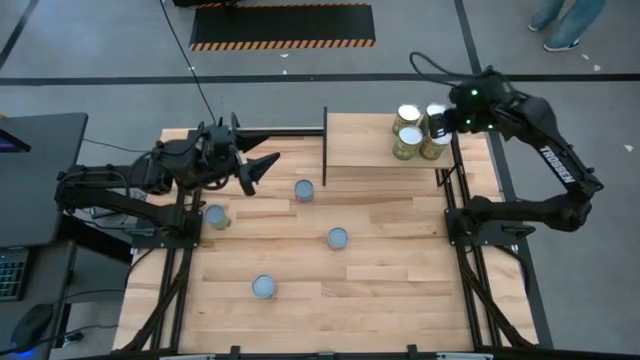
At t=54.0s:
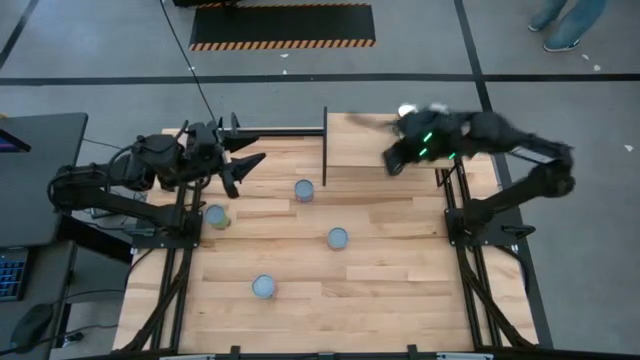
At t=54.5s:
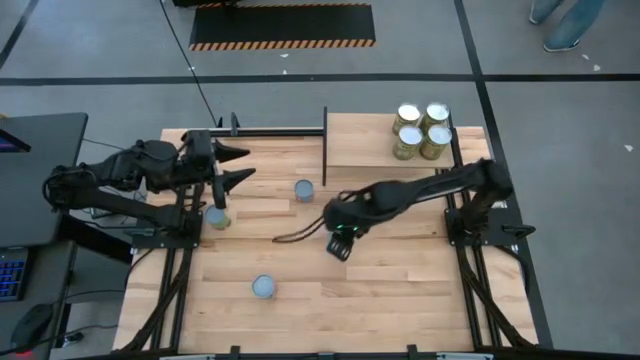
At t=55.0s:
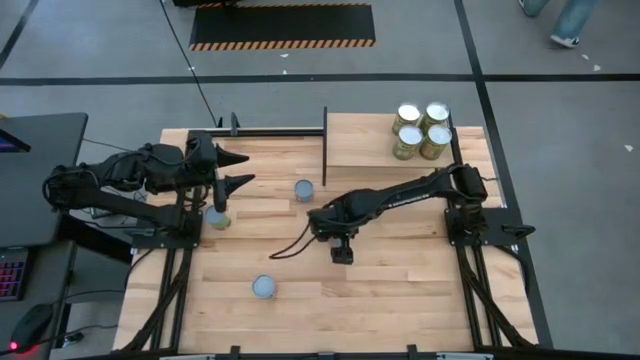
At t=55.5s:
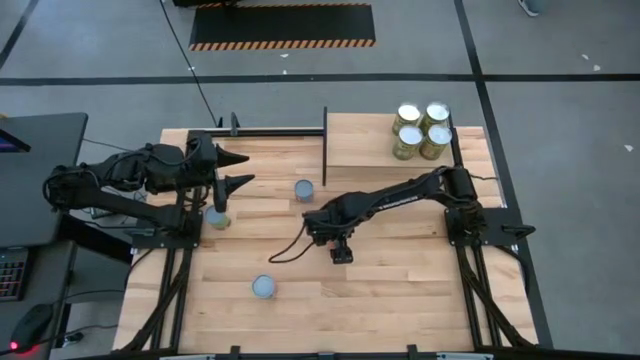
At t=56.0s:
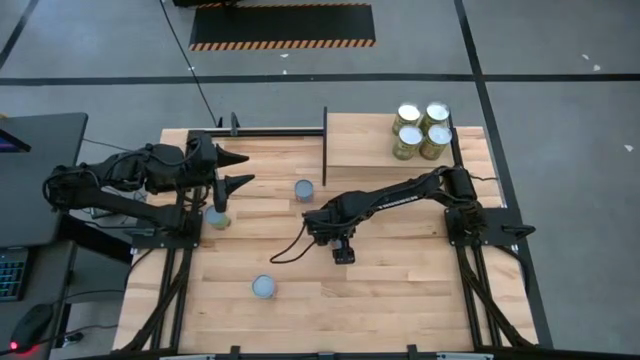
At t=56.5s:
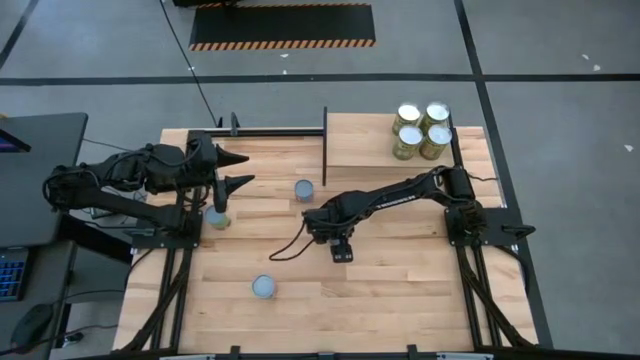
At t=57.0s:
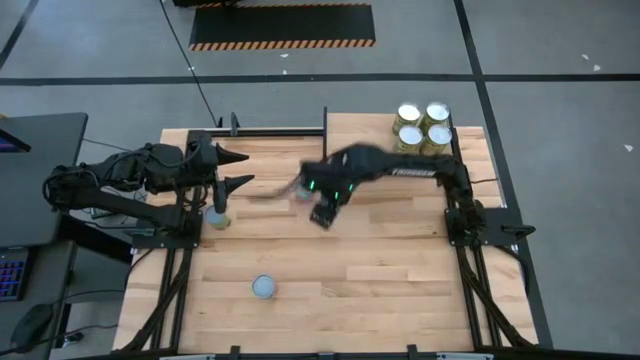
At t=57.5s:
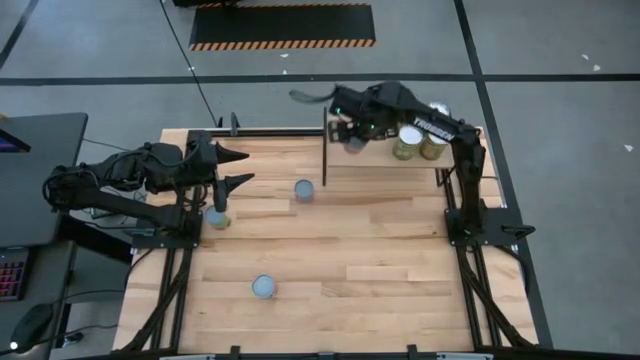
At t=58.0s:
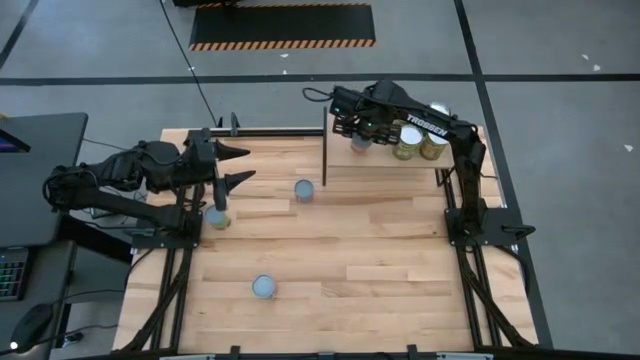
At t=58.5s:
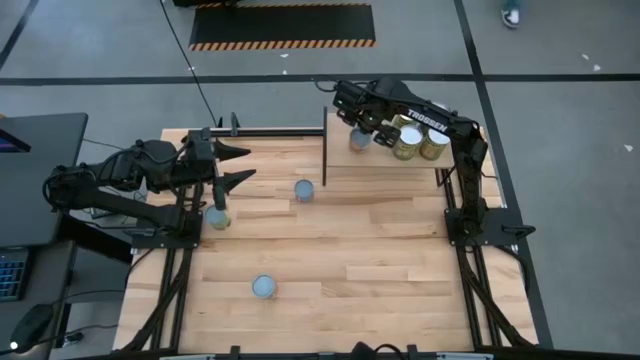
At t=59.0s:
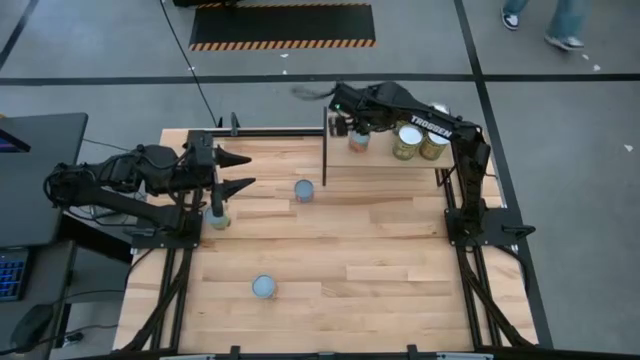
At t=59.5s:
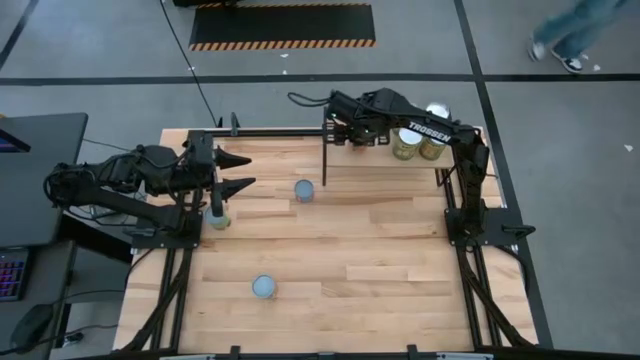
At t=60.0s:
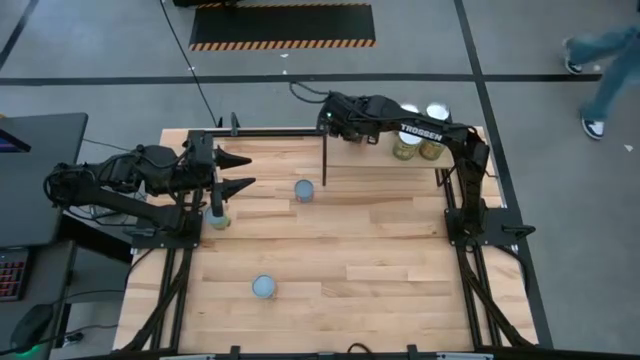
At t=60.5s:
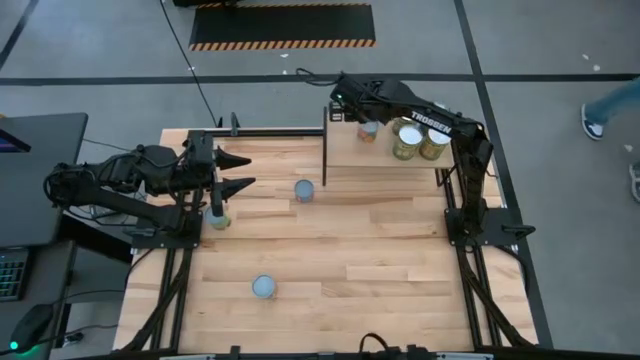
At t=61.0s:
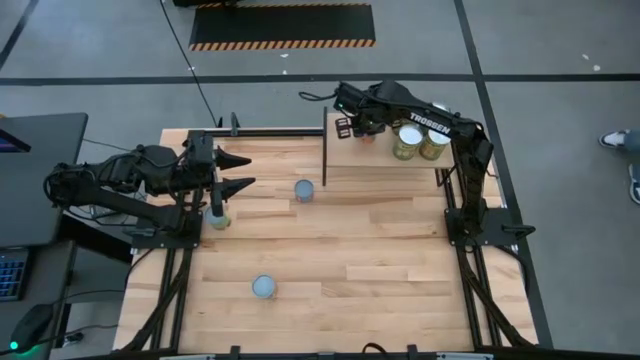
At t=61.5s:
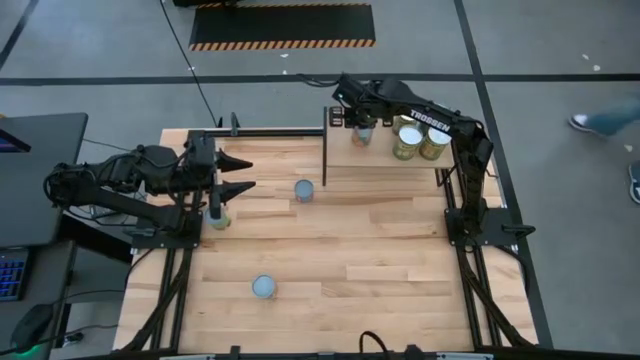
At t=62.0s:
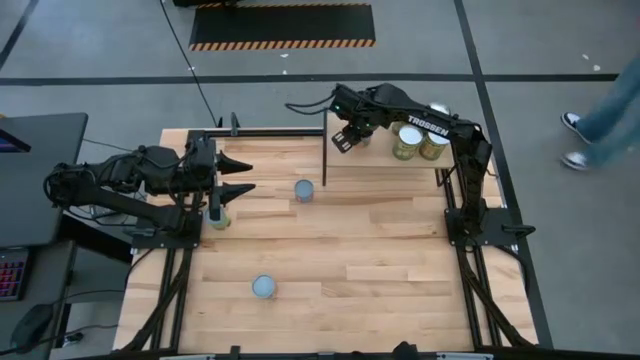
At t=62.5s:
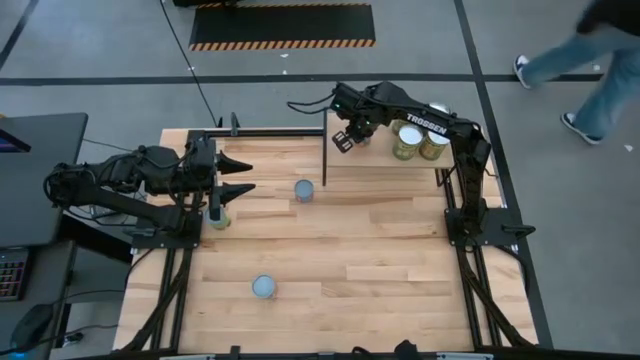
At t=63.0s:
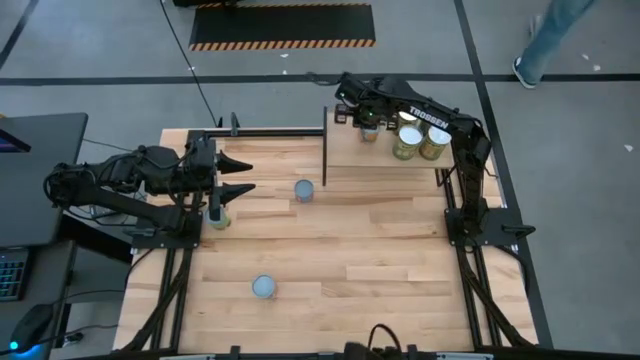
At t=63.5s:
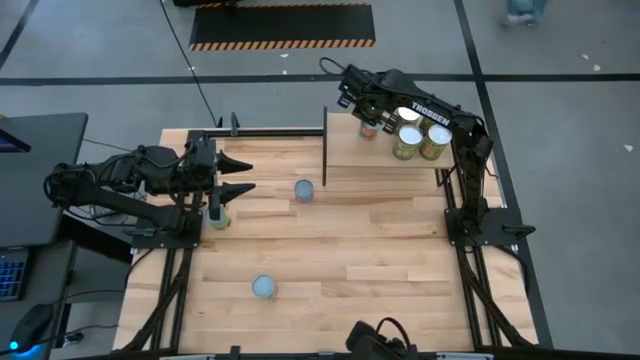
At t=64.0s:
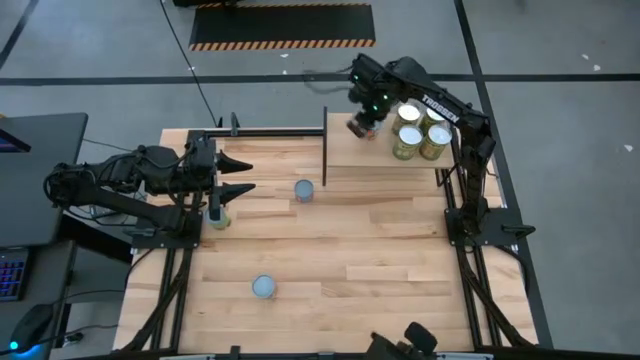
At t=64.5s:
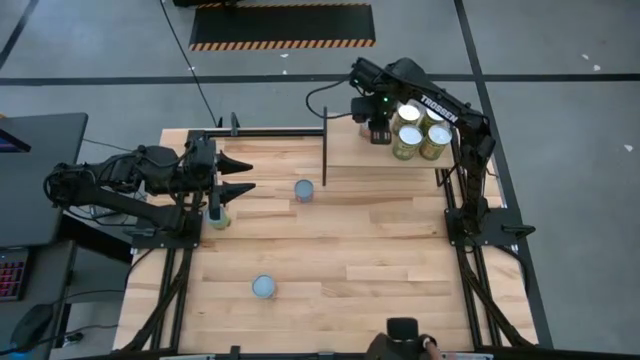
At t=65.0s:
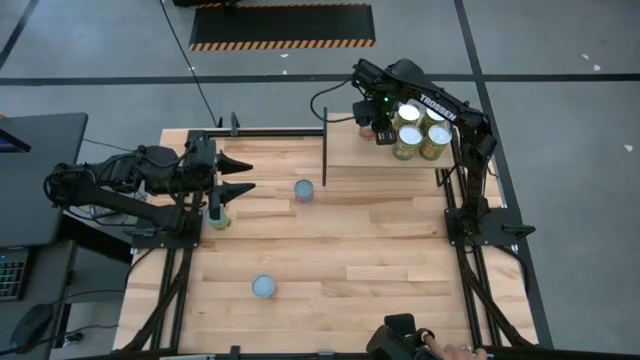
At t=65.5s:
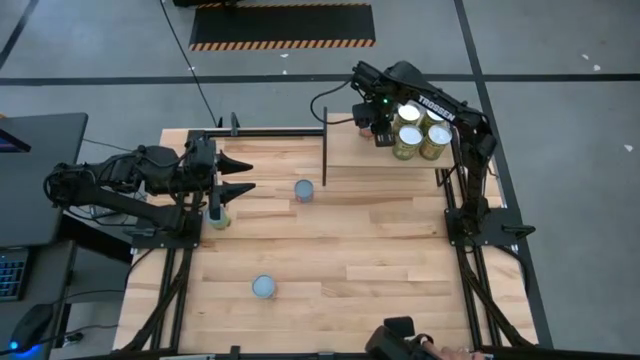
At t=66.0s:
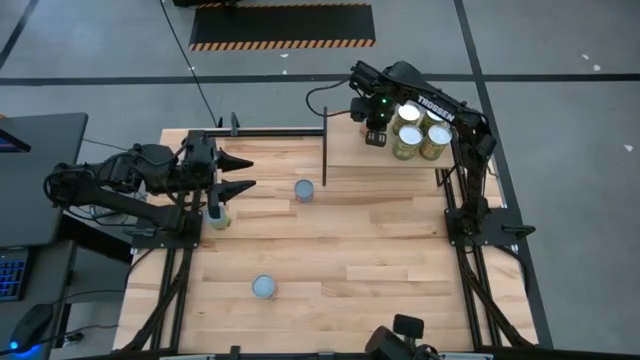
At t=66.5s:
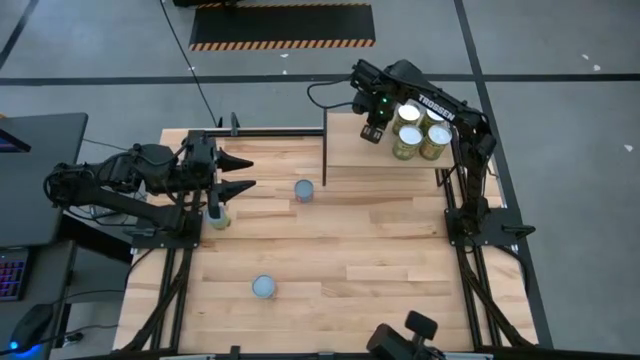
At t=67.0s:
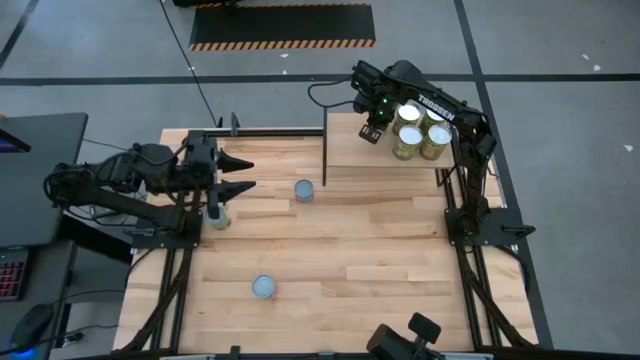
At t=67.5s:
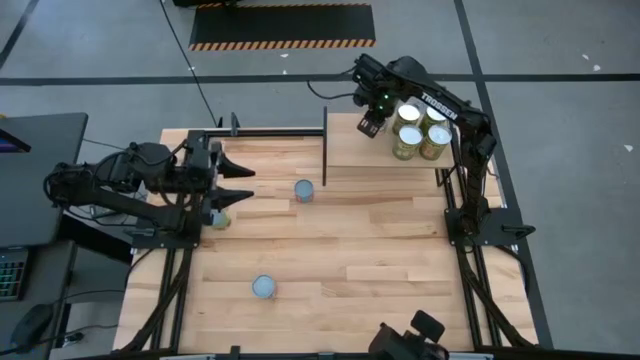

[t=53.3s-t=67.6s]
Task: Pick and place cans onto a shelf
Put the small canned oranges on the shelf

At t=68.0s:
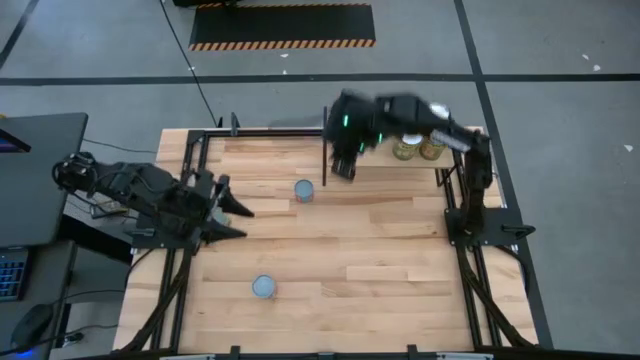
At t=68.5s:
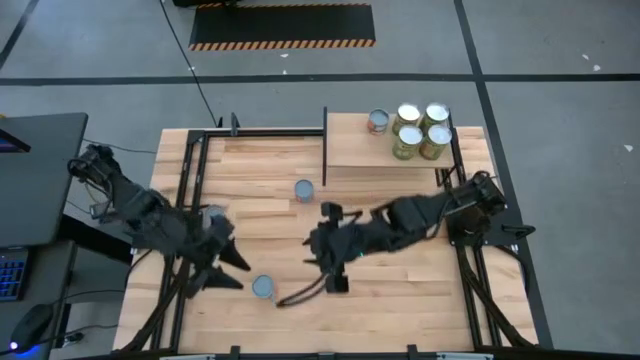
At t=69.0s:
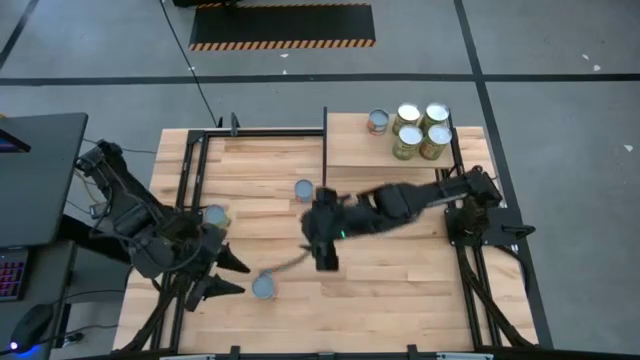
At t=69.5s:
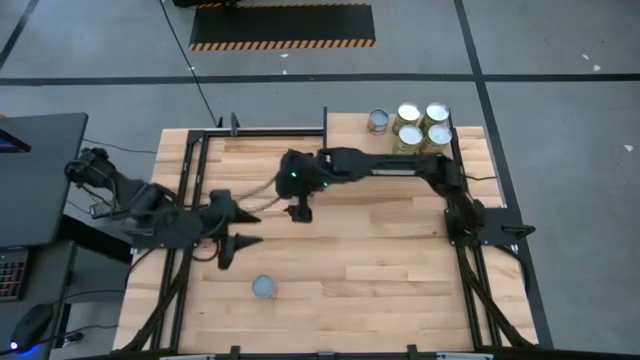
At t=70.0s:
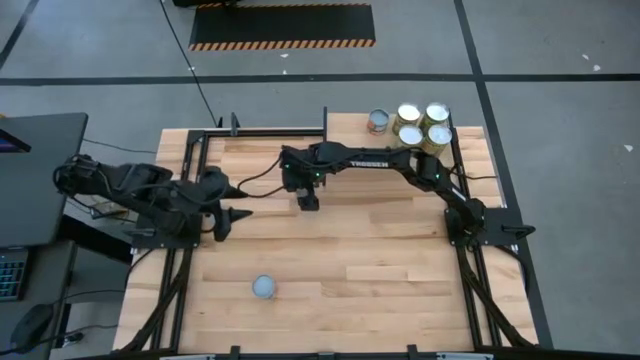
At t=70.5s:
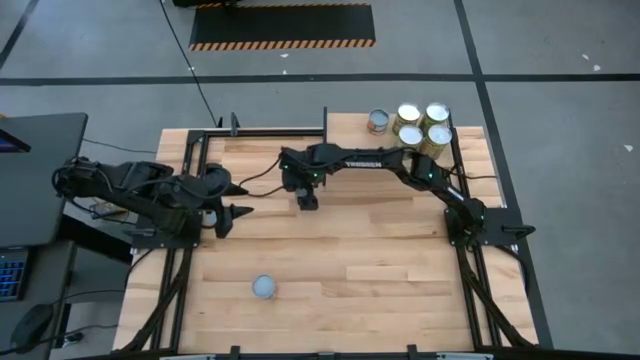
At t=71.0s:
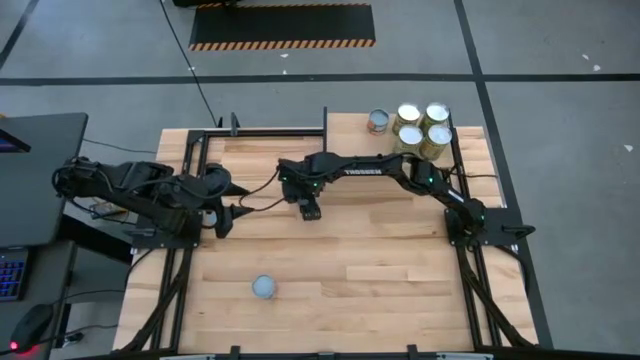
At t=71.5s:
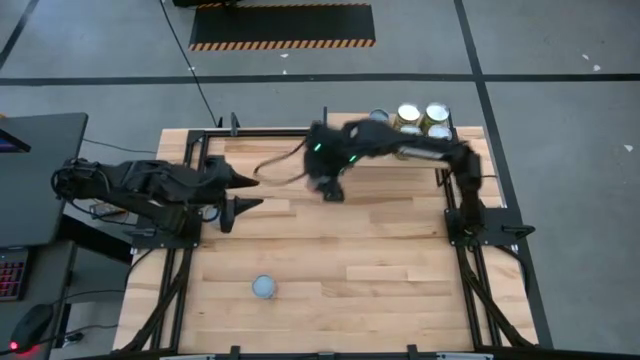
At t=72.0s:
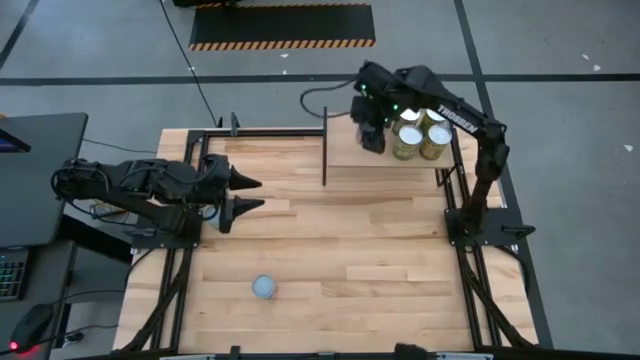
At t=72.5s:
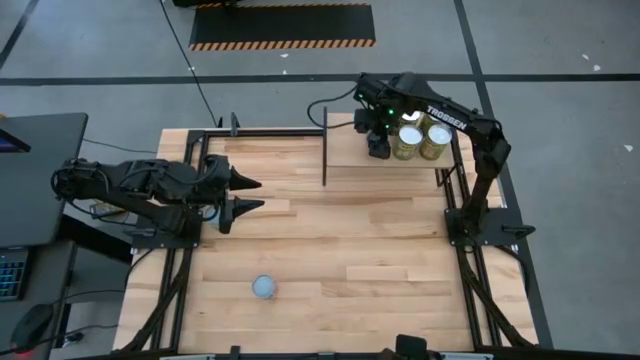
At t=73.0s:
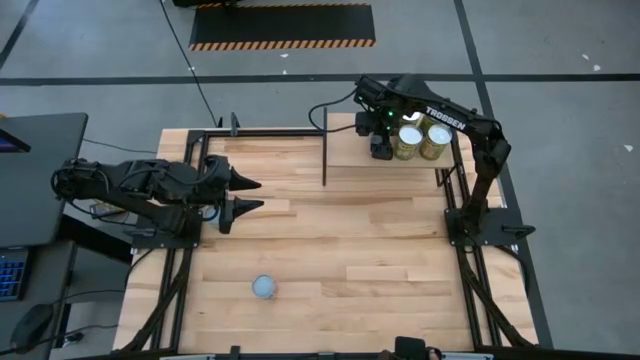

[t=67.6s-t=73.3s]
Put the small canned peas on the shelf

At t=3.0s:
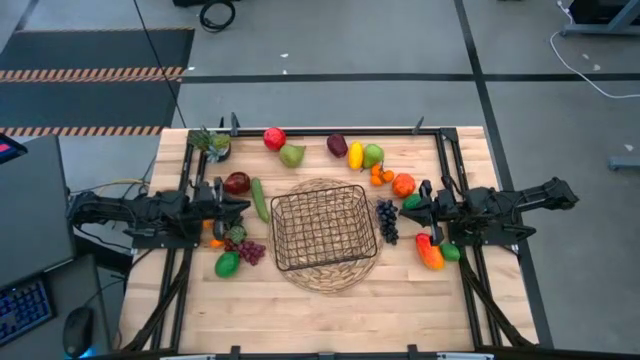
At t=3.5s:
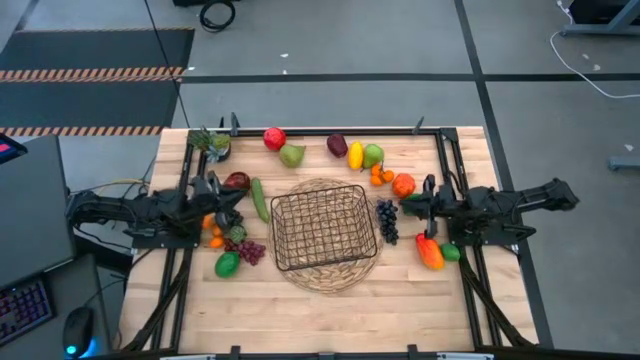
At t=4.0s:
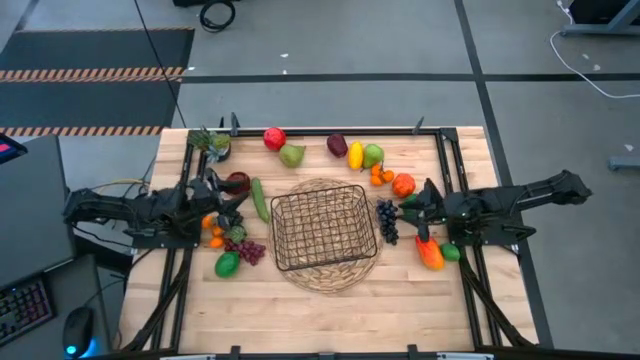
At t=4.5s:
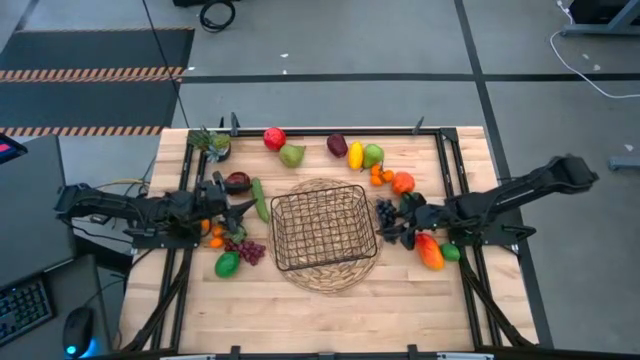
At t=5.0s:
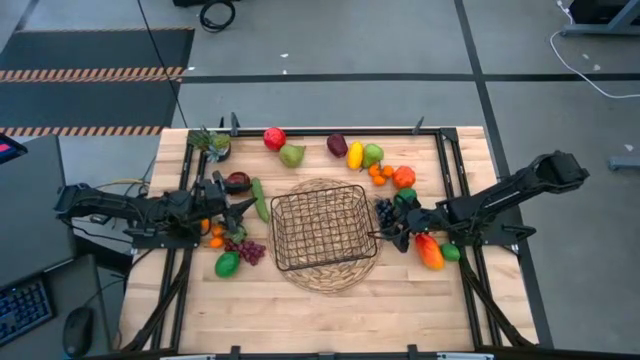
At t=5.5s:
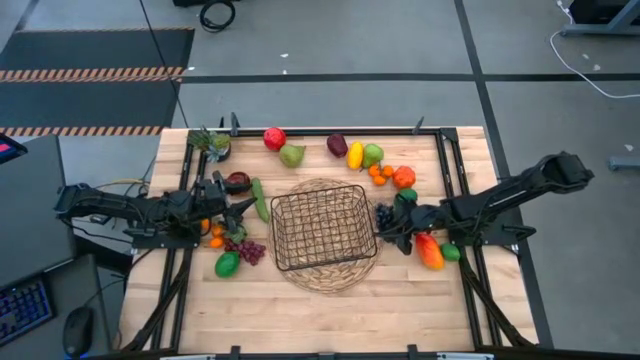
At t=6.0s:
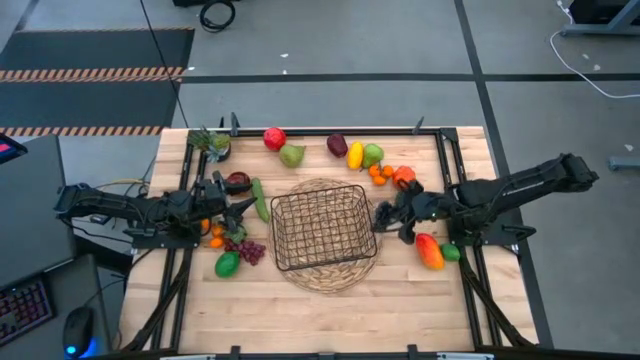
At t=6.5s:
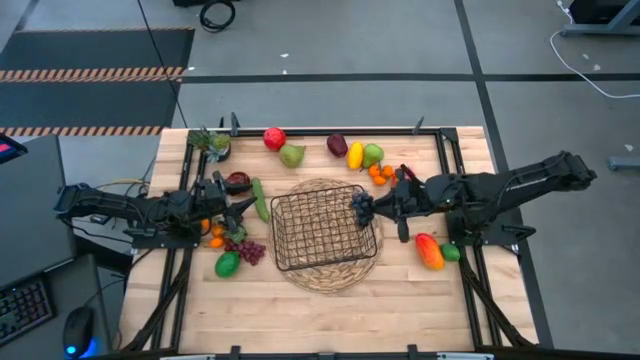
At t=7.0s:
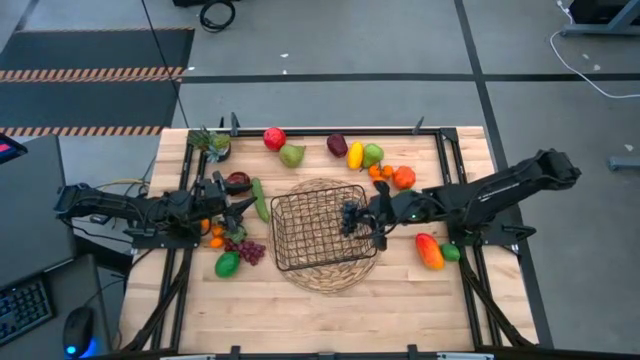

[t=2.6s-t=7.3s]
Task: Build produce basket
Put the right black grapes into the black wire basket
